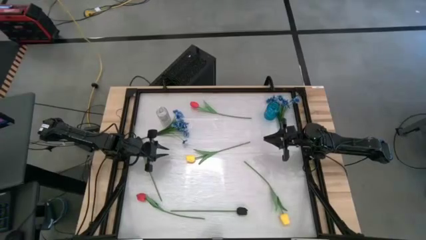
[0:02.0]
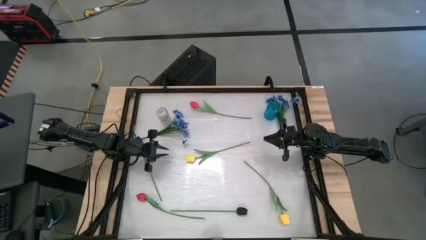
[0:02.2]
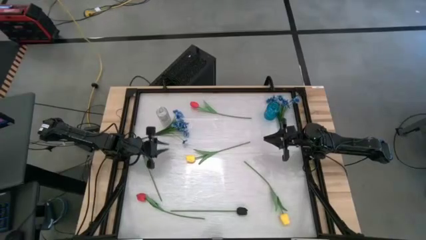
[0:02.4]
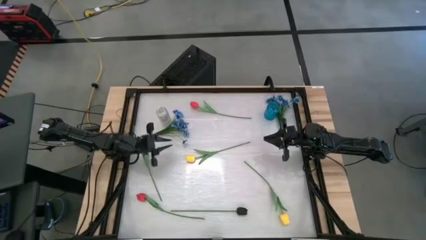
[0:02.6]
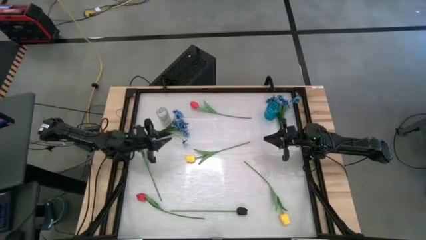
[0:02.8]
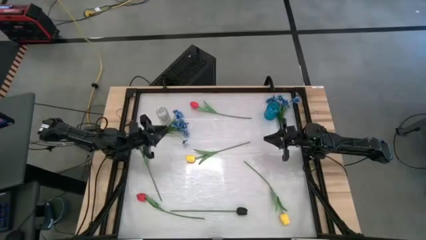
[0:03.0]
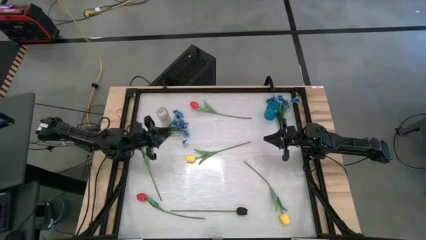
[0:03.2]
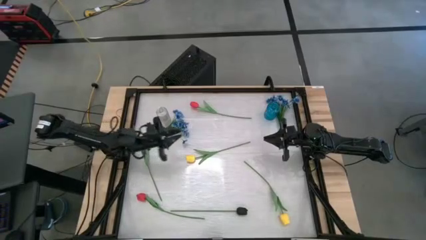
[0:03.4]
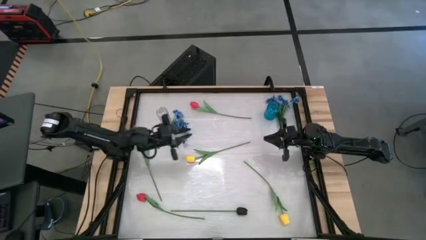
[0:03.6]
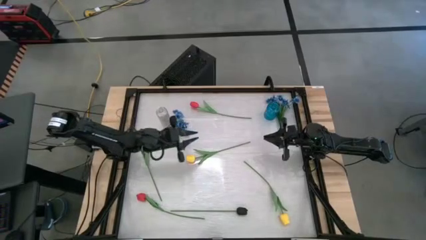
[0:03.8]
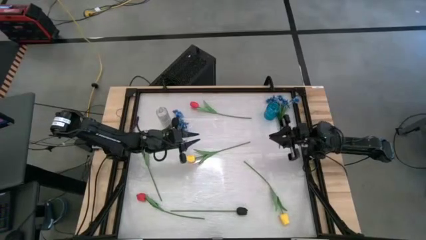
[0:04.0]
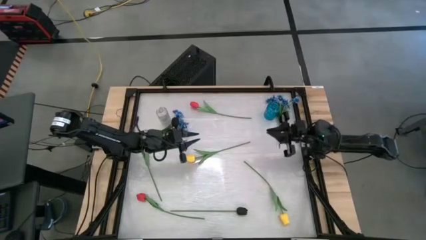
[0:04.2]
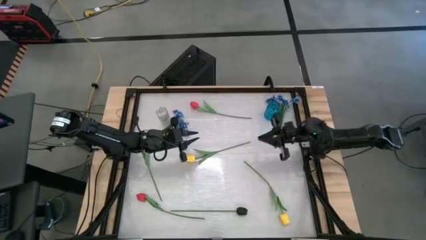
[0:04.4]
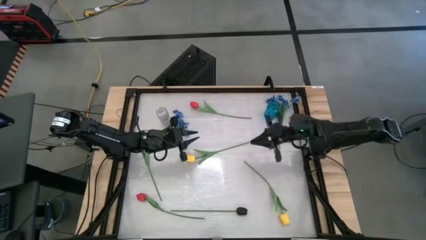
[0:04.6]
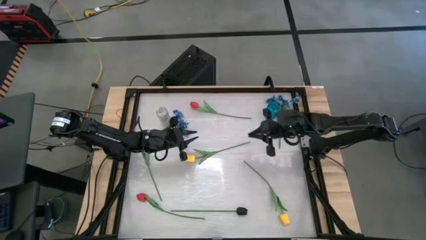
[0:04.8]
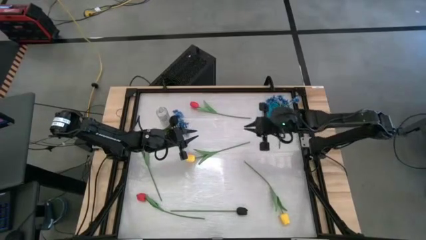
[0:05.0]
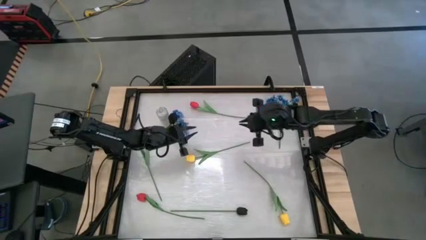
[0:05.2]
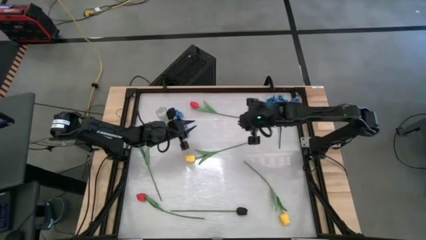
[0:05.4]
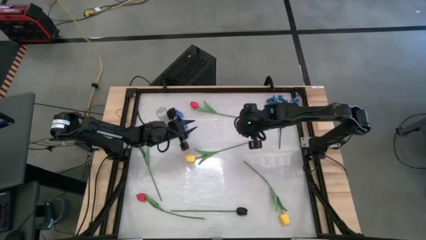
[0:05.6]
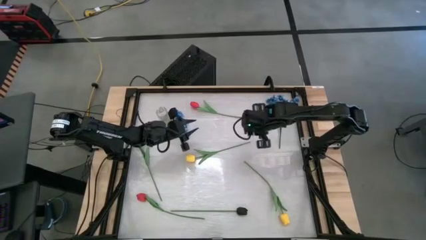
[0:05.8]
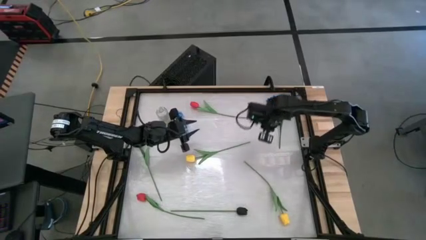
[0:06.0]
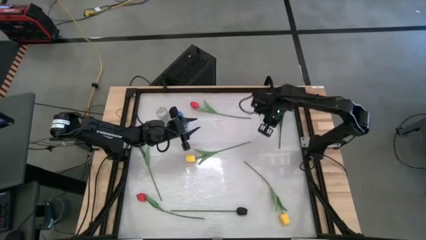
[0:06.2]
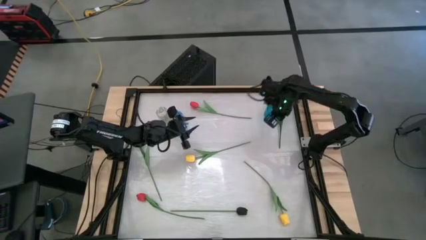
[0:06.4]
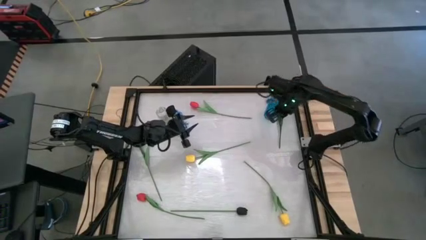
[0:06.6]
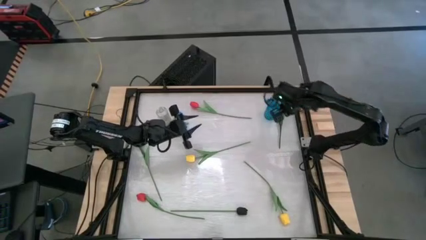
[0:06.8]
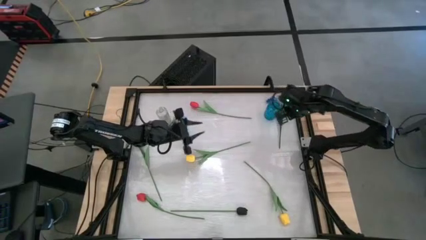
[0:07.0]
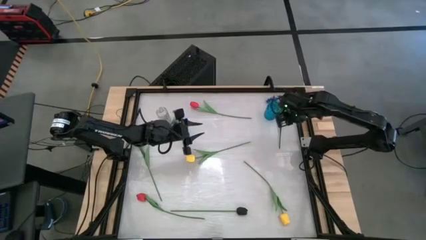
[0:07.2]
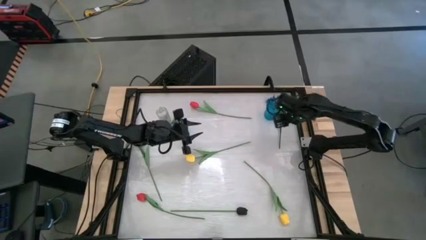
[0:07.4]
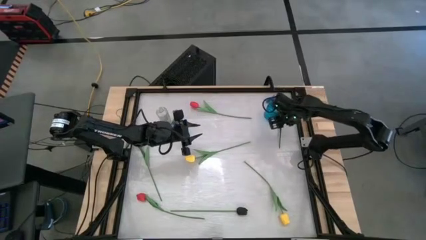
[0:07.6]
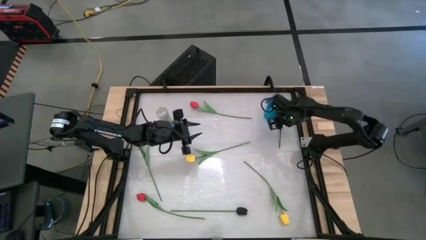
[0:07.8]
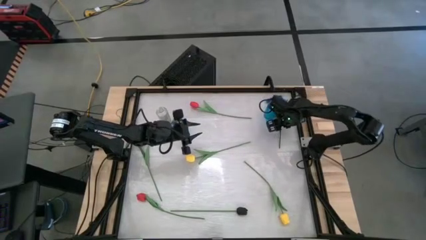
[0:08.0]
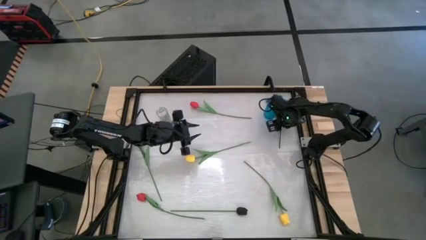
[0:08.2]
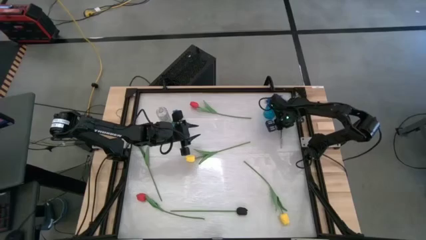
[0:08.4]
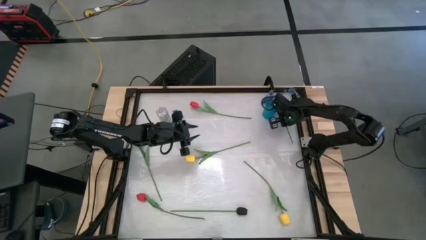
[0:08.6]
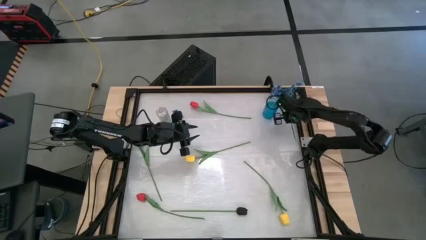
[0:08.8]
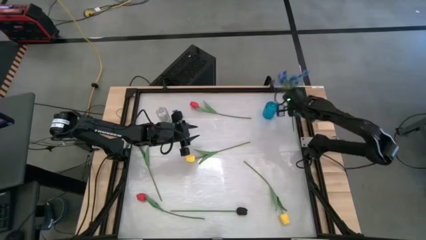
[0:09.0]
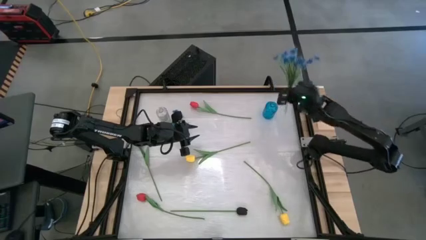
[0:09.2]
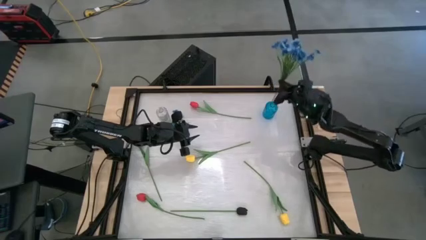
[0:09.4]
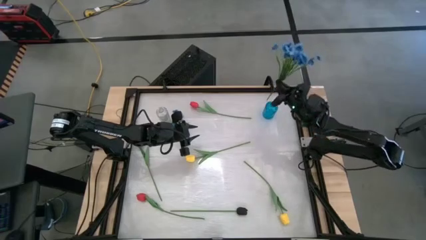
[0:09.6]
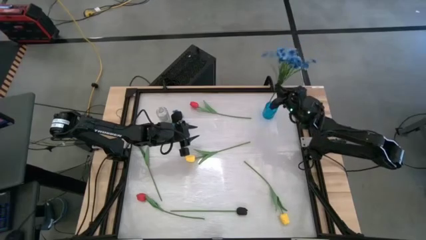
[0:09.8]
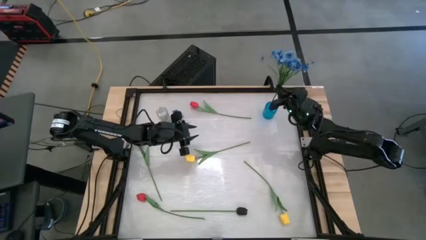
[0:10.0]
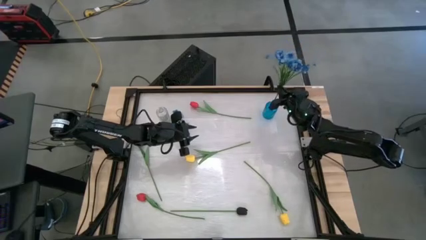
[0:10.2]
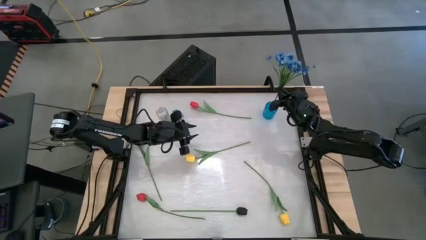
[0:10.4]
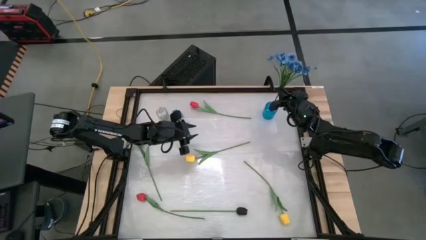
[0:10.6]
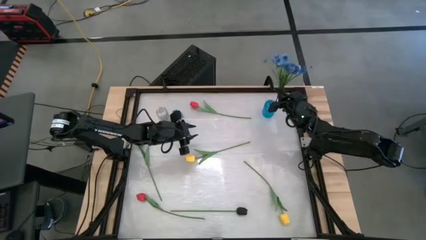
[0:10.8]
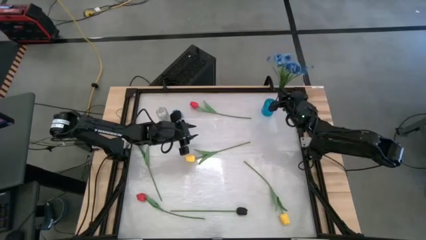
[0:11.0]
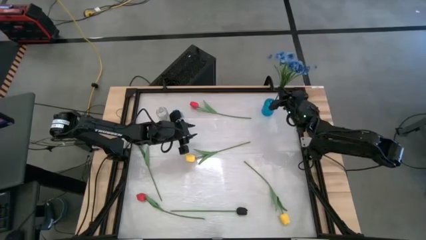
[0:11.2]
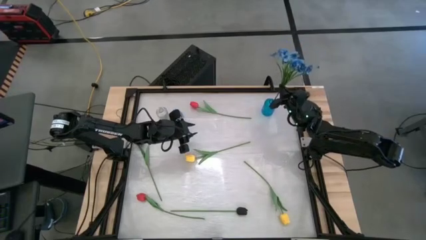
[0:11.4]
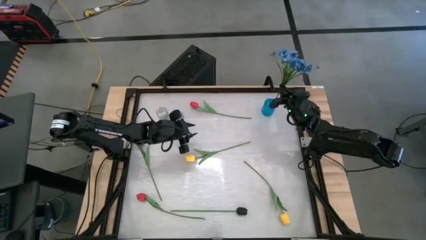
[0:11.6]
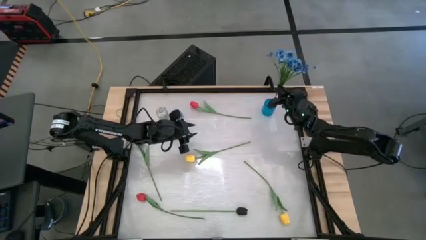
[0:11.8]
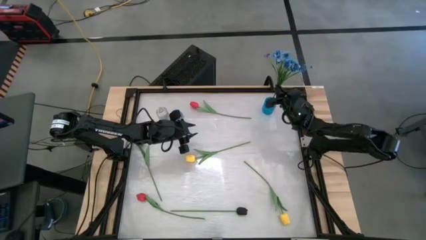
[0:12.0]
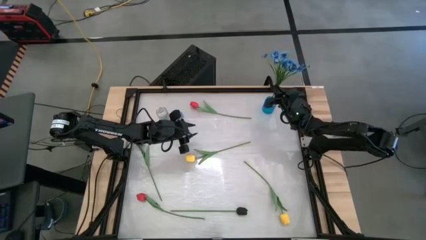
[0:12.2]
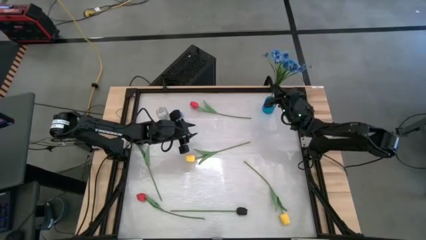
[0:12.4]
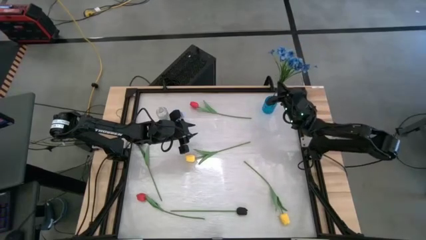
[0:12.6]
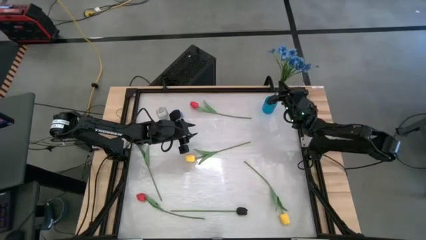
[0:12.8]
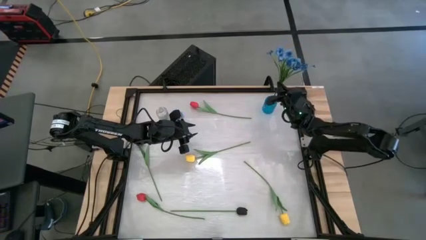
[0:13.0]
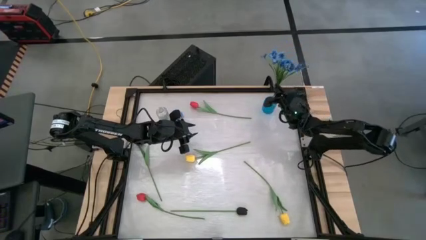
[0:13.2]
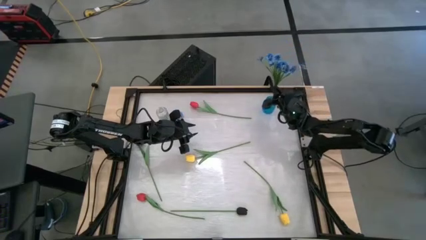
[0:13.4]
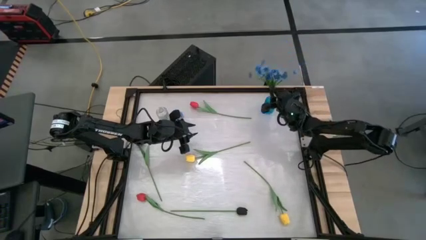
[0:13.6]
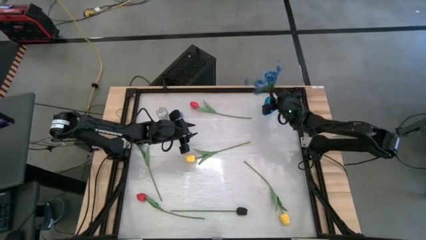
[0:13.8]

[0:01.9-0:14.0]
Task: Sort flowers into vase by color
Put the right blue flower into the blue vase
